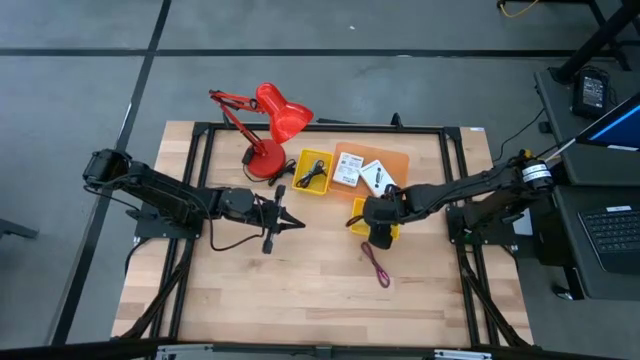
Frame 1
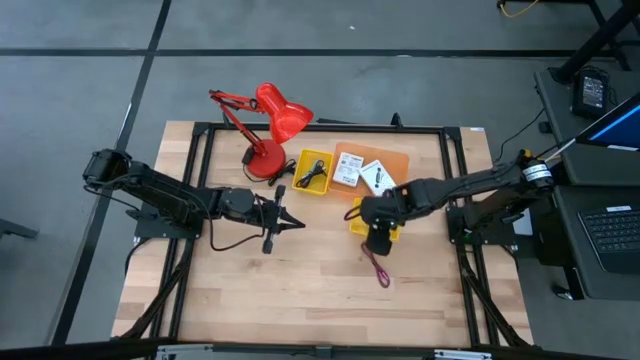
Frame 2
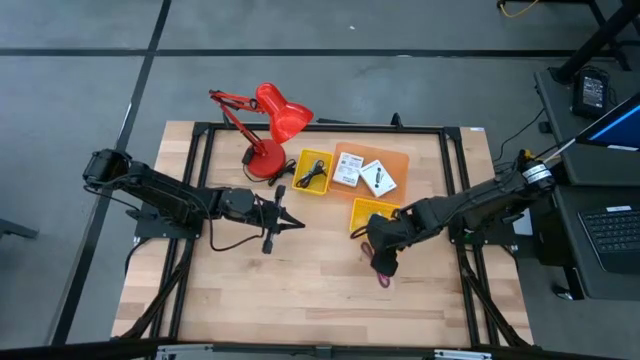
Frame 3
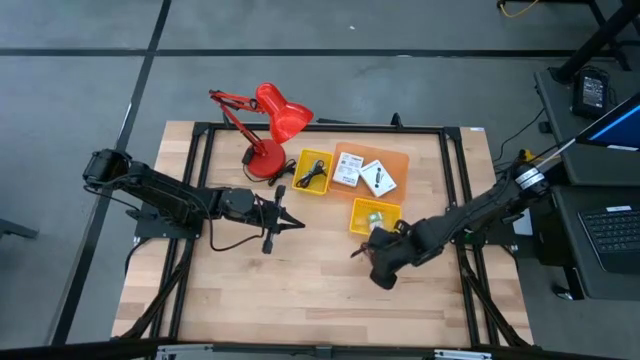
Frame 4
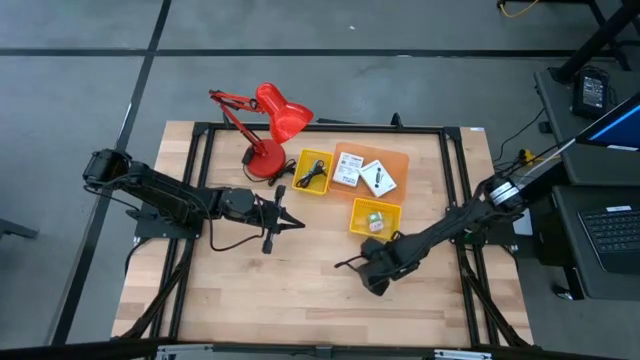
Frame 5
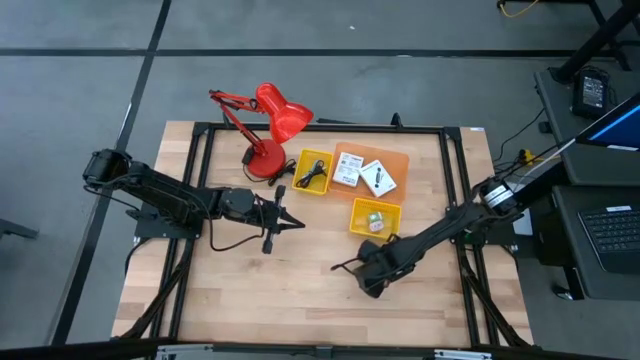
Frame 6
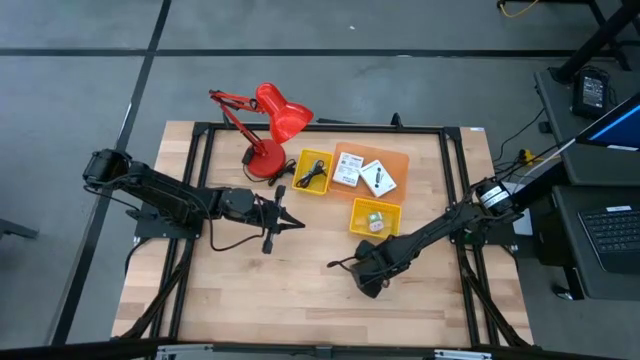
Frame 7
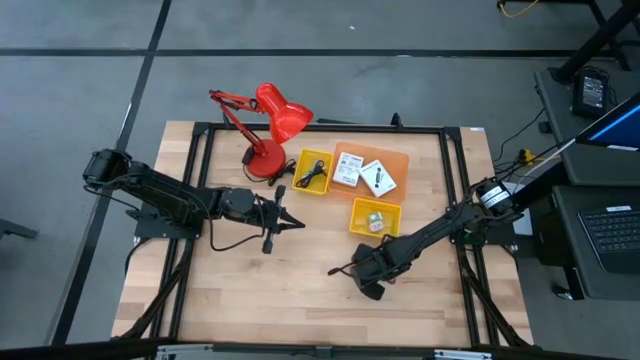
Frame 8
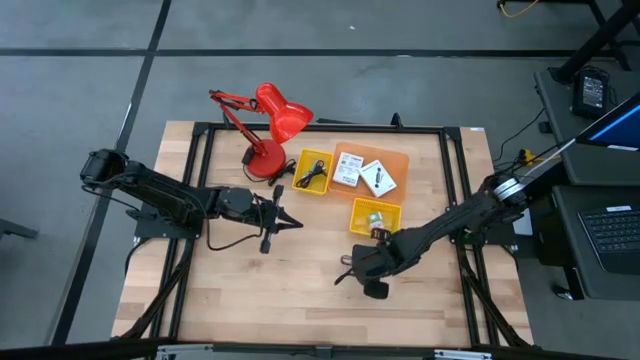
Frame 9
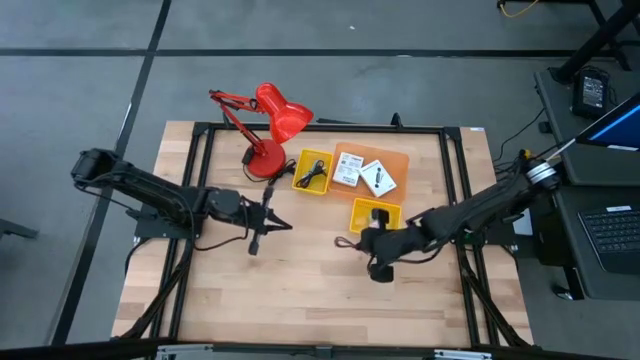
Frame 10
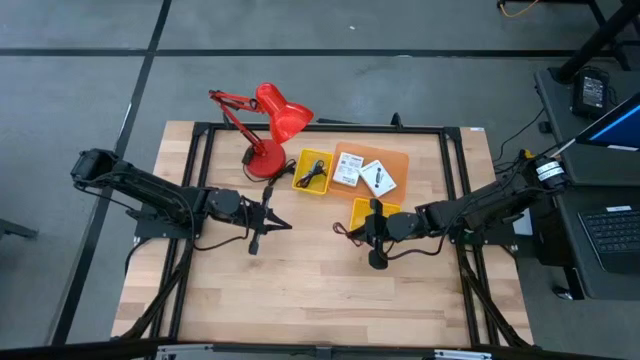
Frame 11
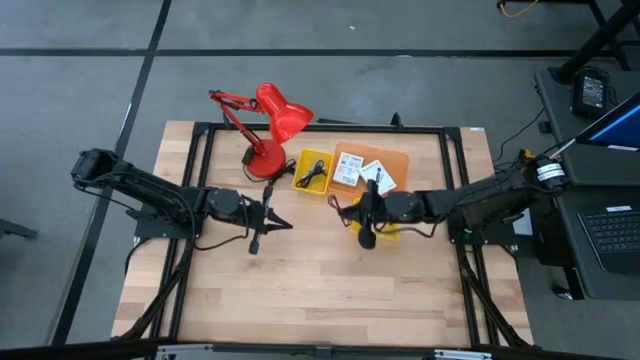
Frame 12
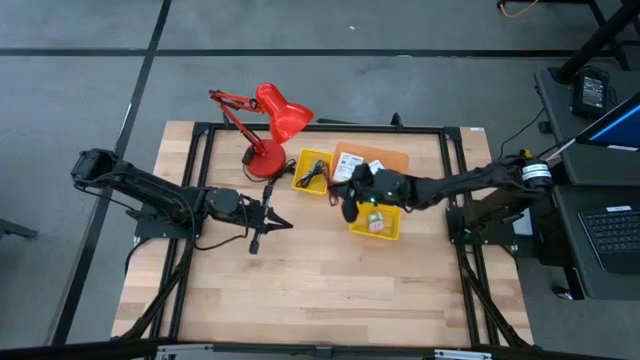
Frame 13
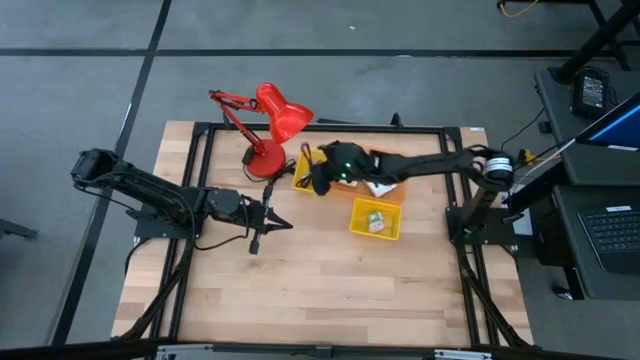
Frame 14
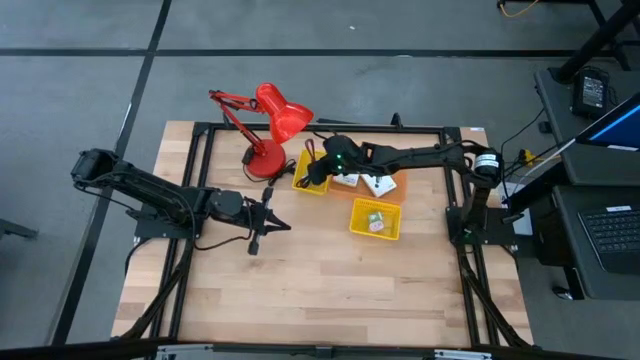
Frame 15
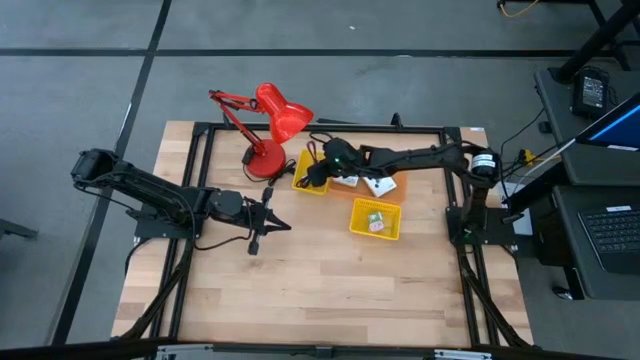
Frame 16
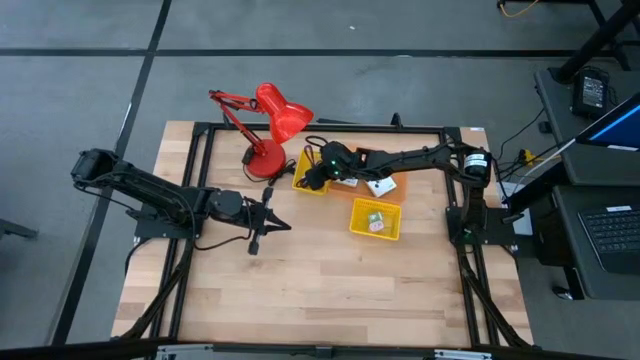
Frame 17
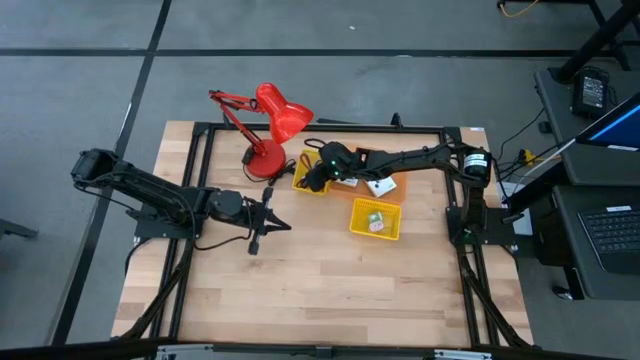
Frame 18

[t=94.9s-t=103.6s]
Task: Pick and place items into bin
Put the pink cable into the left yellow basket

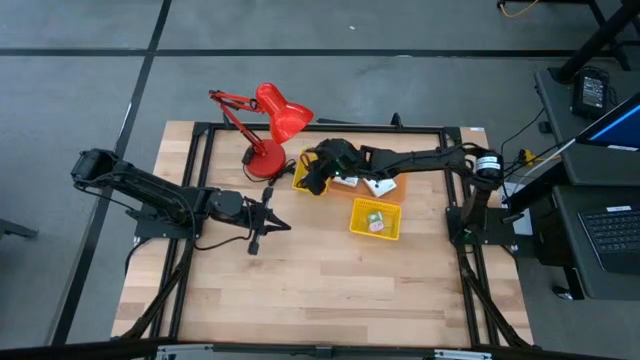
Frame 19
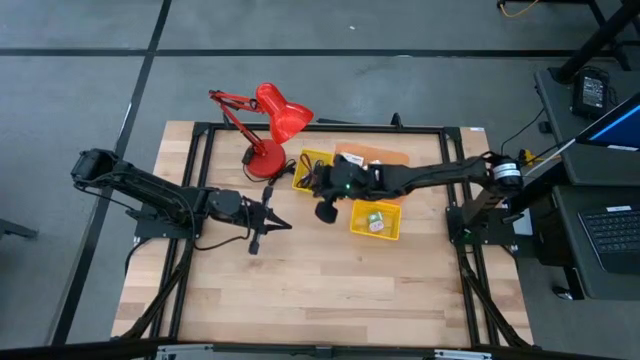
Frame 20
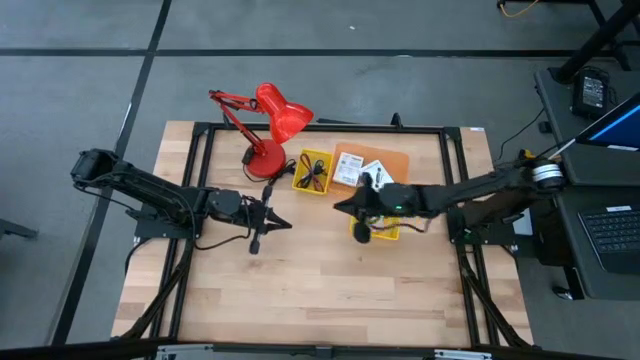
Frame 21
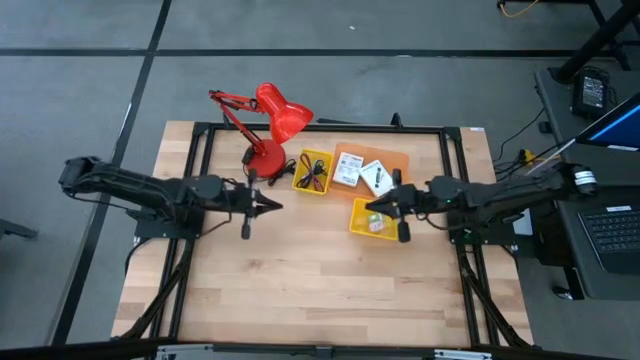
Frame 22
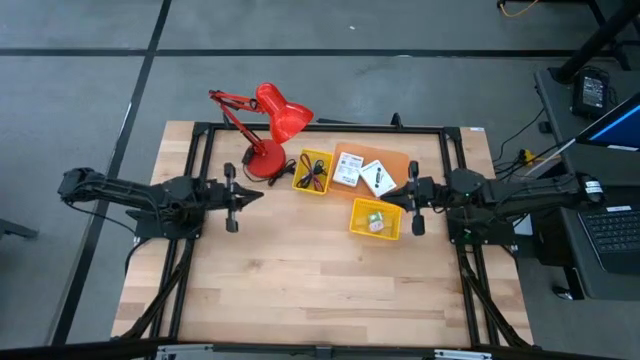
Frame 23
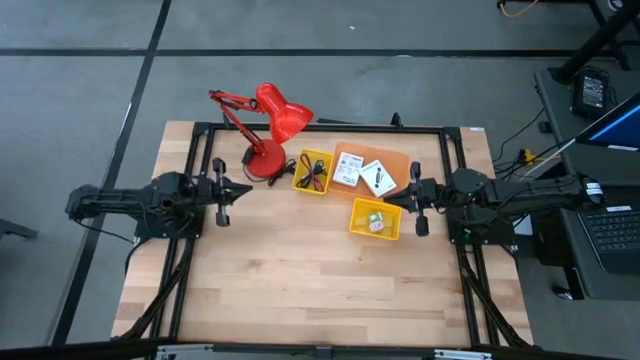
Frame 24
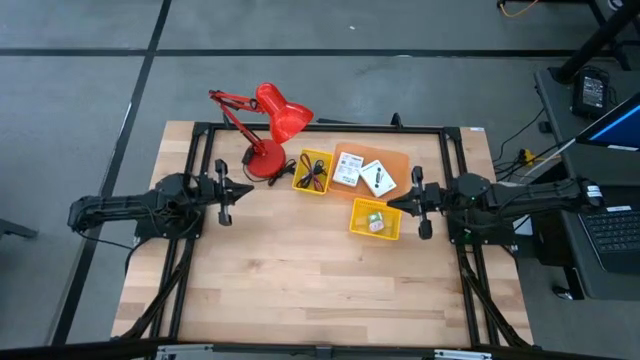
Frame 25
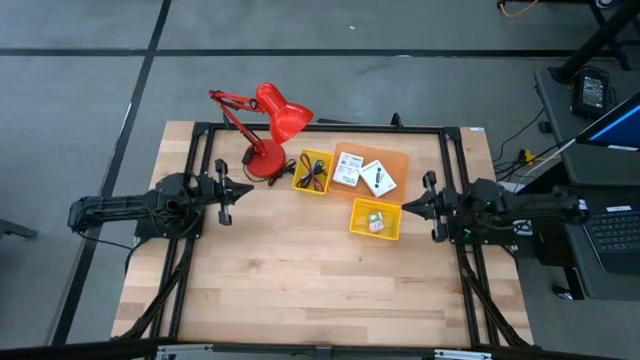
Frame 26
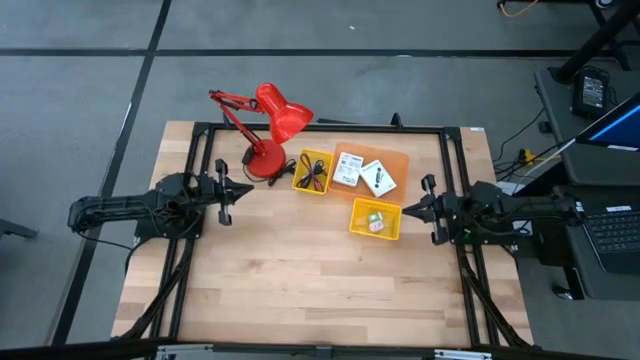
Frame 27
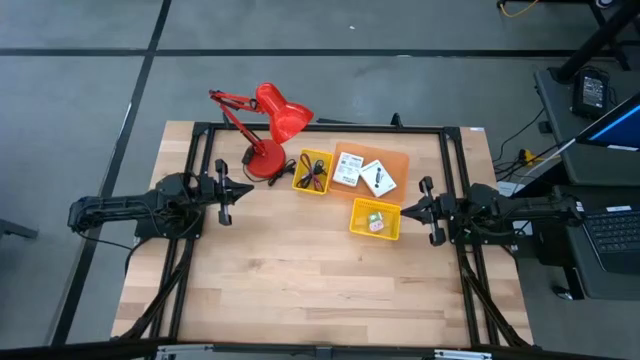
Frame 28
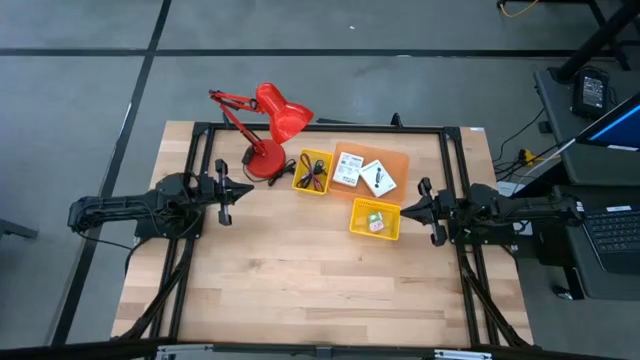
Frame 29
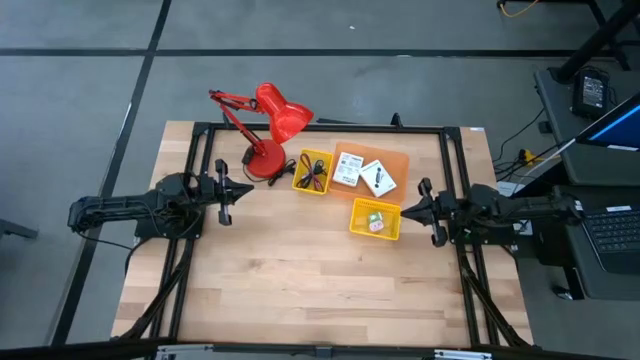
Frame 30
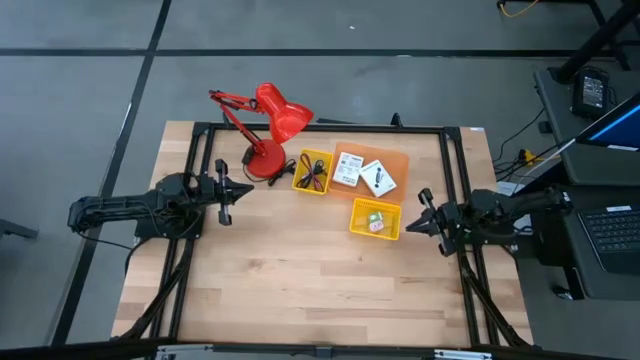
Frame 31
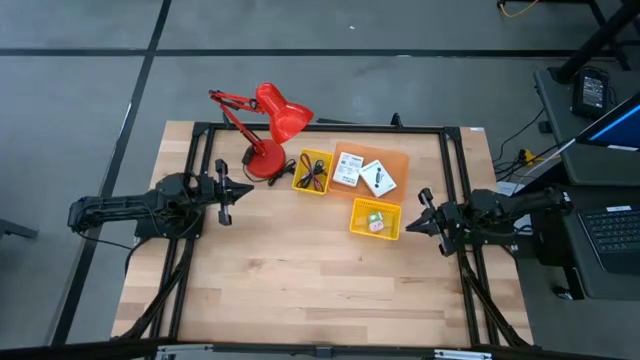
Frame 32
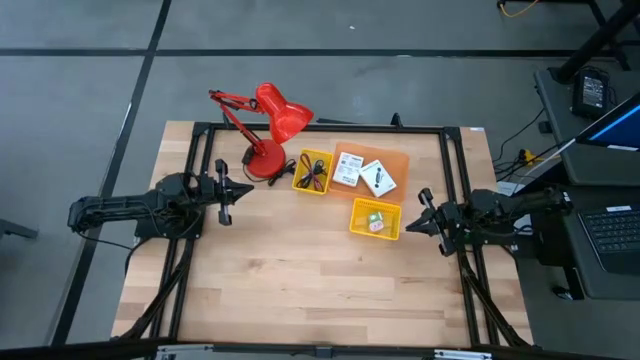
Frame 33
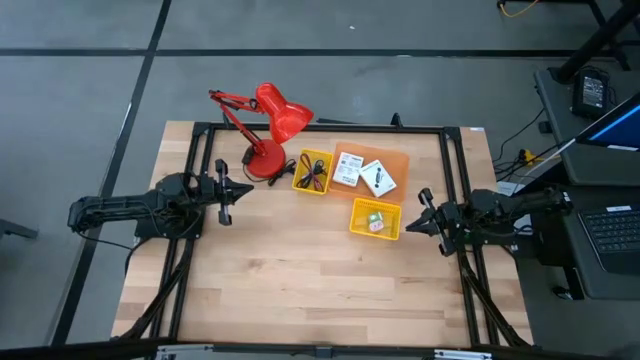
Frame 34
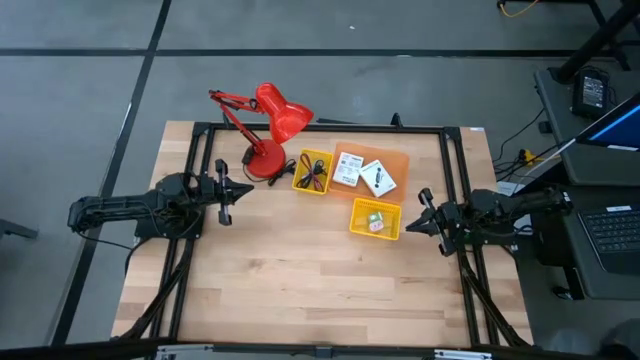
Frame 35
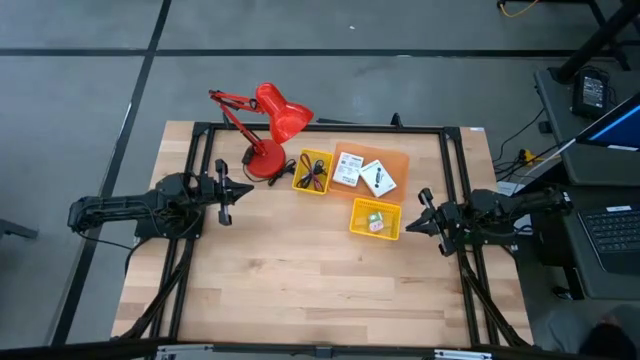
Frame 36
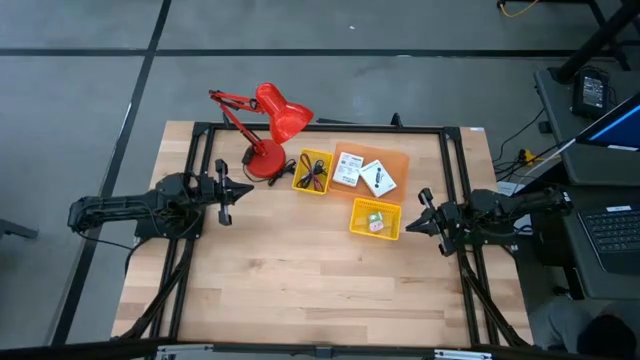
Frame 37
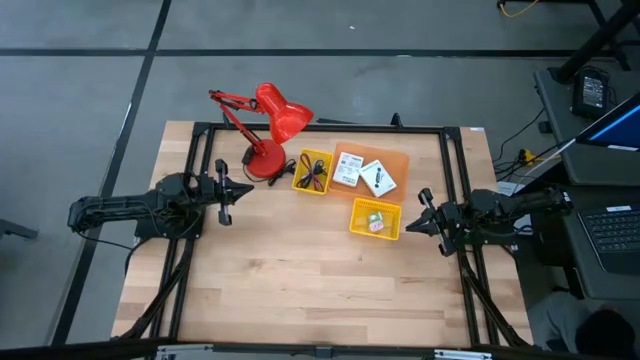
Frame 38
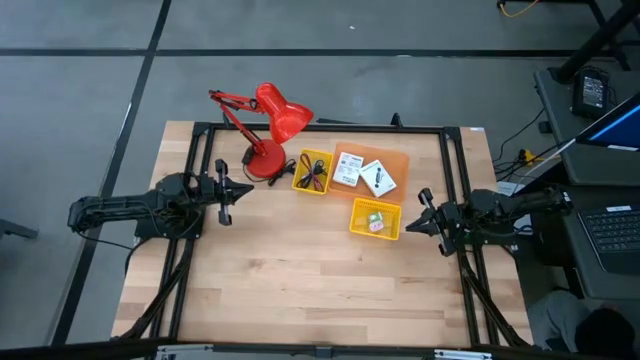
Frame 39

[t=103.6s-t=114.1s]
Return to Home Position

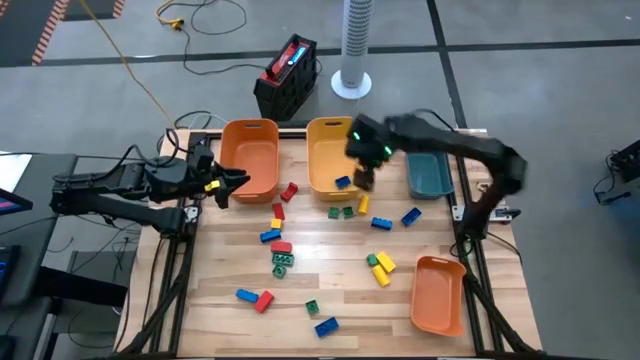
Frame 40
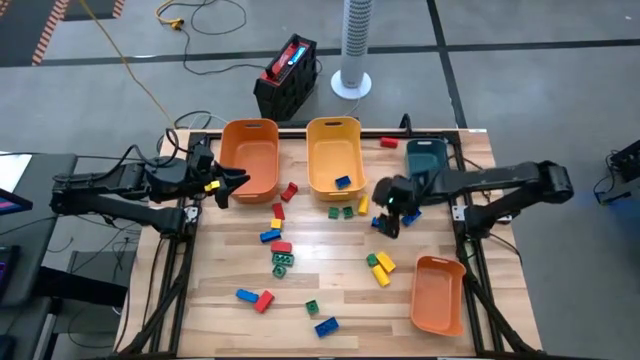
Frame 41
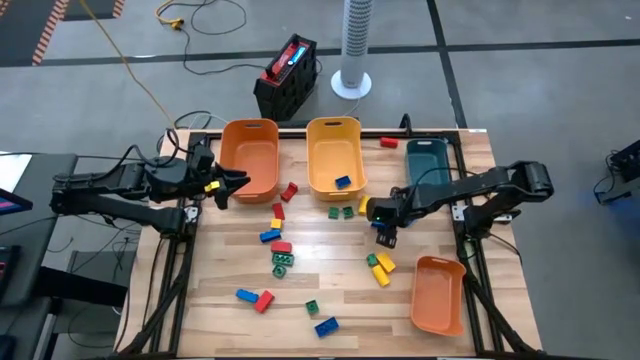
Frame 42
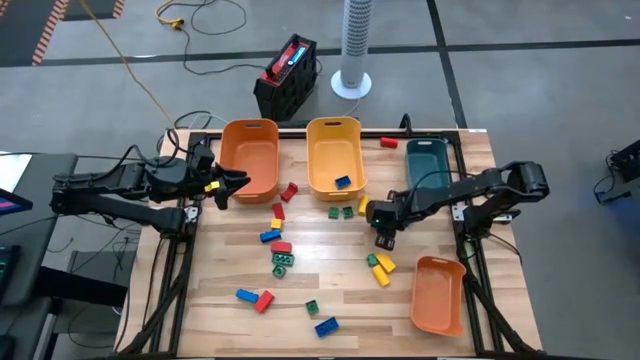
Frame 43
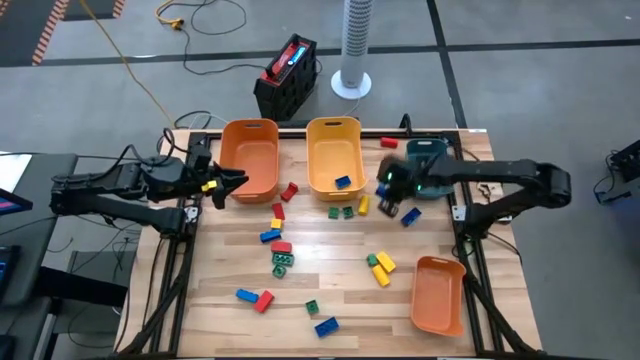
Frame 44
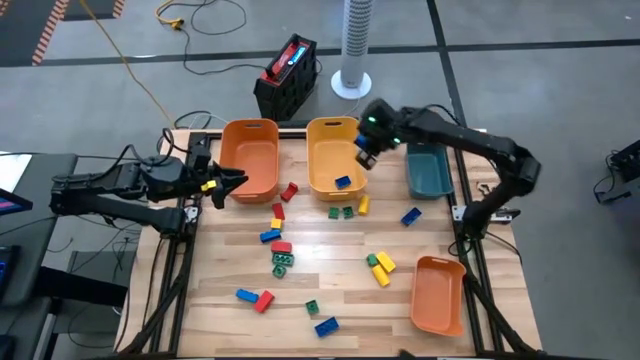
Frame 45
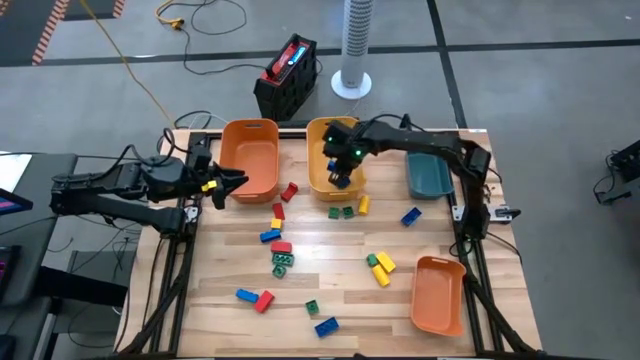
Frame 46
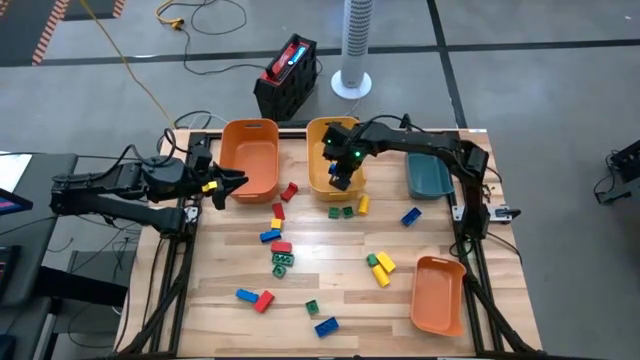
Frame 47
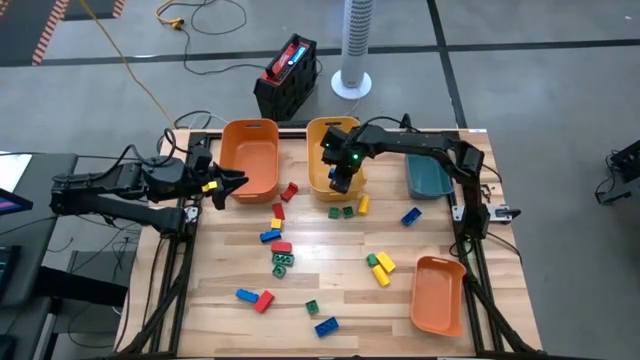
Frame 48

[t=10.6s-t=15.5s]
Task: Sort blocks
Put the blue game piece into the yellow bin
